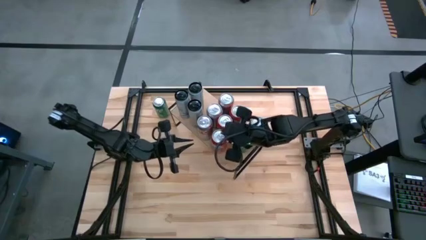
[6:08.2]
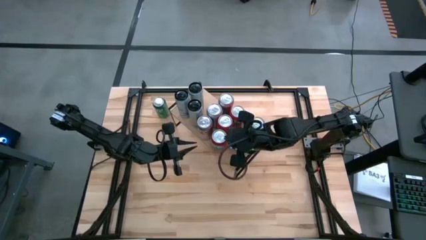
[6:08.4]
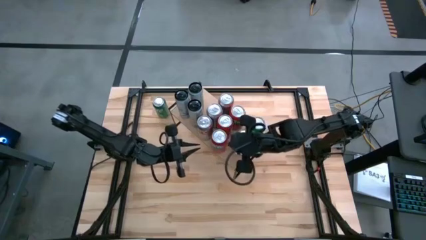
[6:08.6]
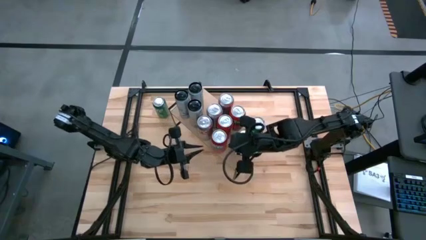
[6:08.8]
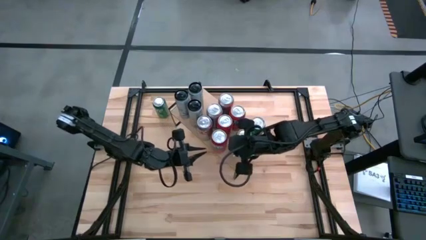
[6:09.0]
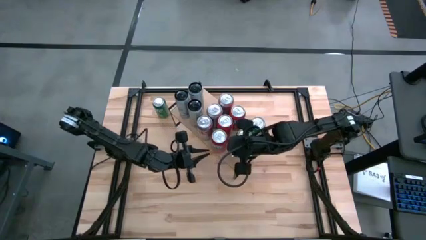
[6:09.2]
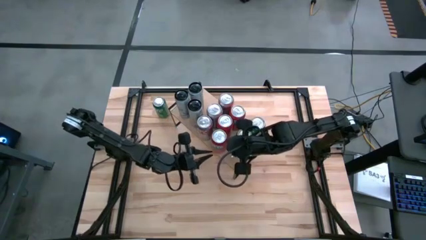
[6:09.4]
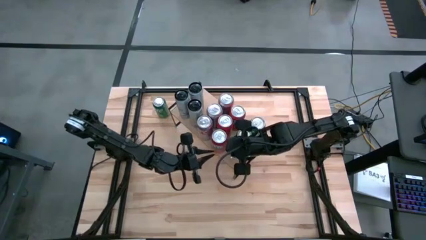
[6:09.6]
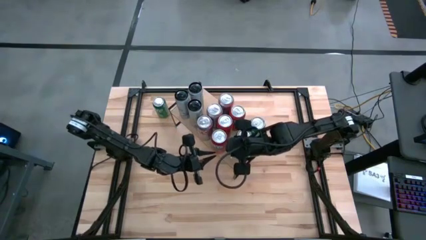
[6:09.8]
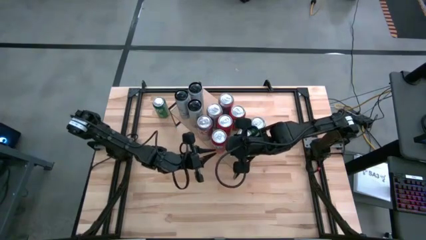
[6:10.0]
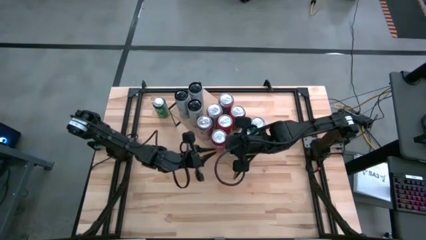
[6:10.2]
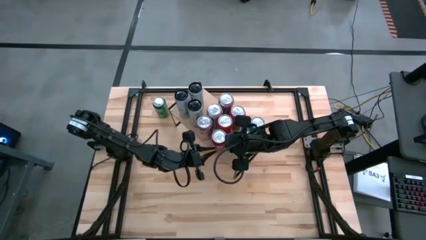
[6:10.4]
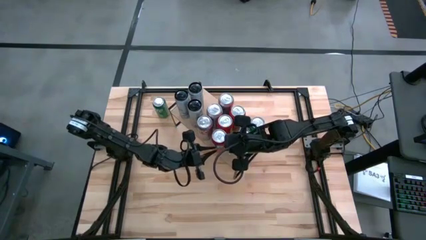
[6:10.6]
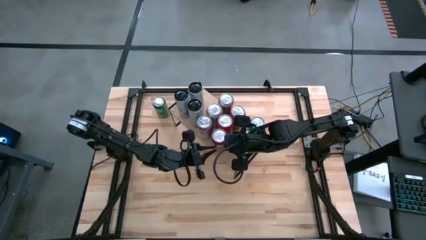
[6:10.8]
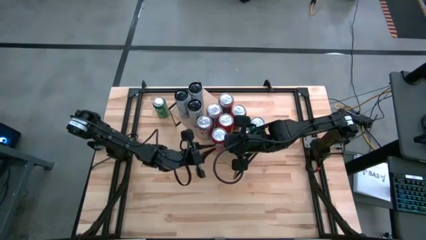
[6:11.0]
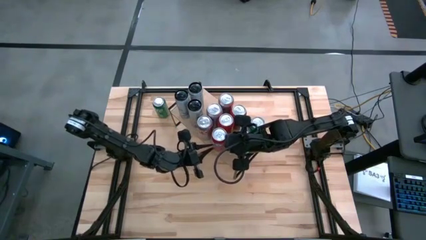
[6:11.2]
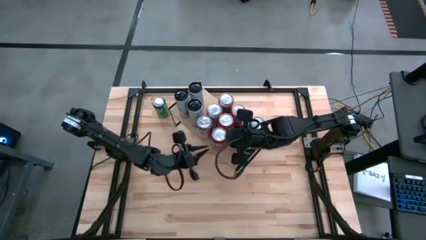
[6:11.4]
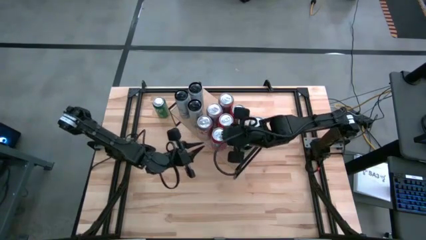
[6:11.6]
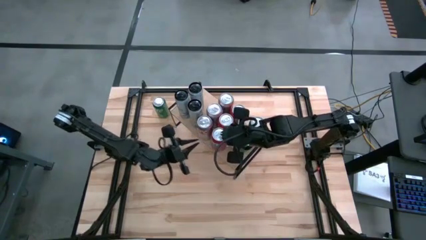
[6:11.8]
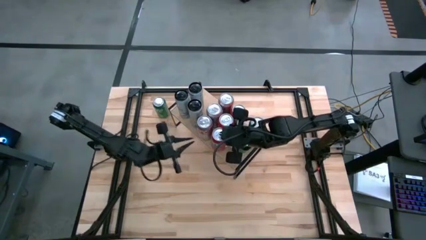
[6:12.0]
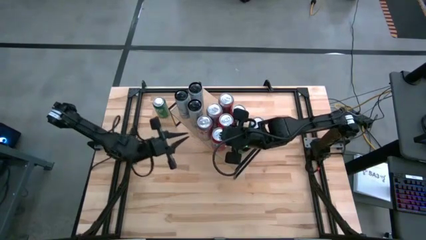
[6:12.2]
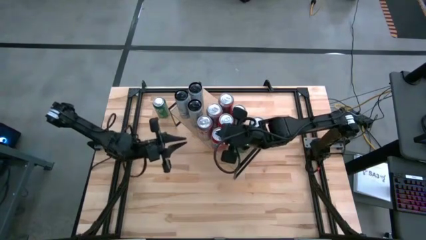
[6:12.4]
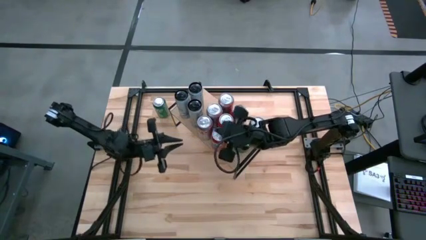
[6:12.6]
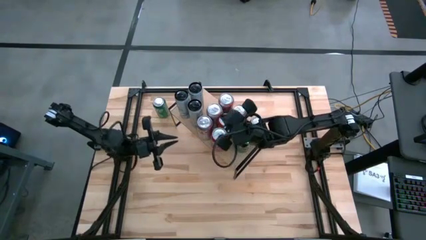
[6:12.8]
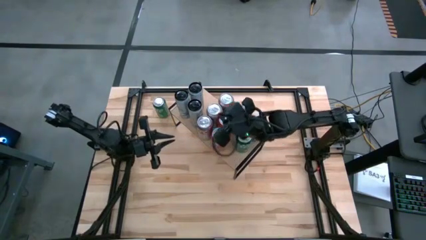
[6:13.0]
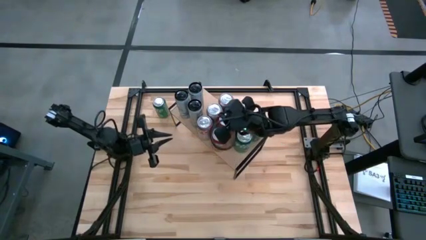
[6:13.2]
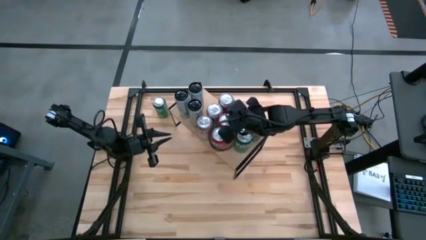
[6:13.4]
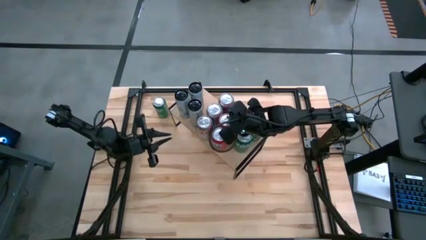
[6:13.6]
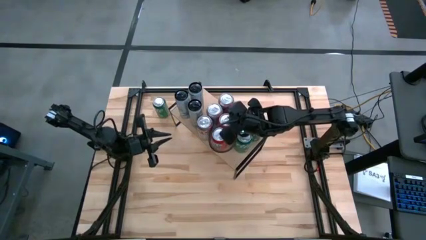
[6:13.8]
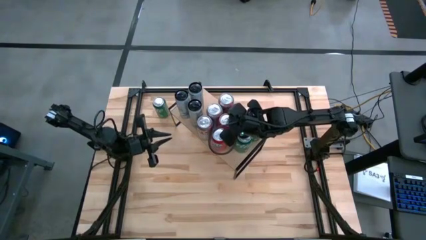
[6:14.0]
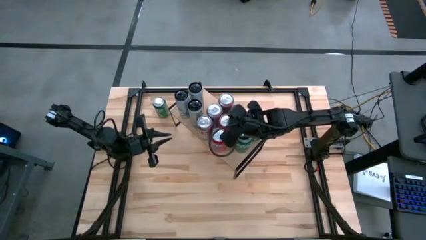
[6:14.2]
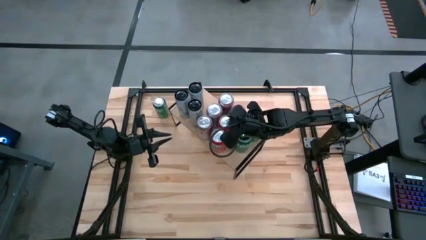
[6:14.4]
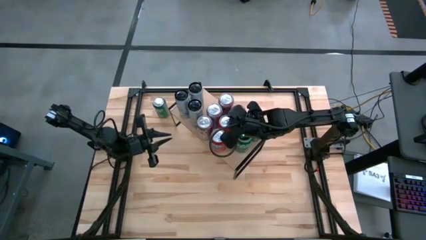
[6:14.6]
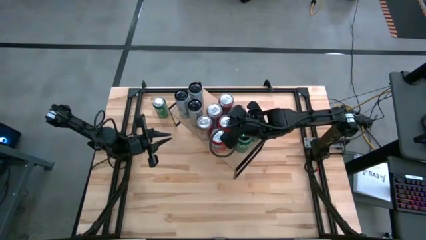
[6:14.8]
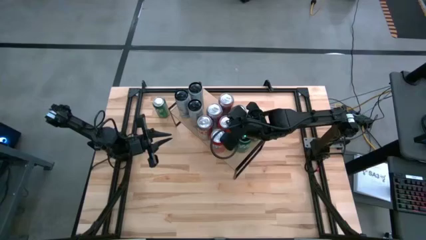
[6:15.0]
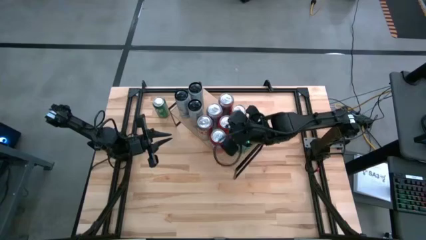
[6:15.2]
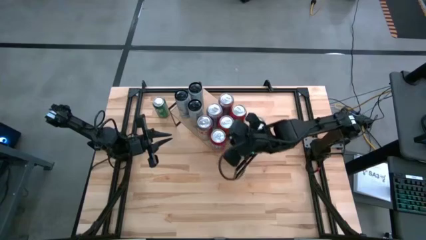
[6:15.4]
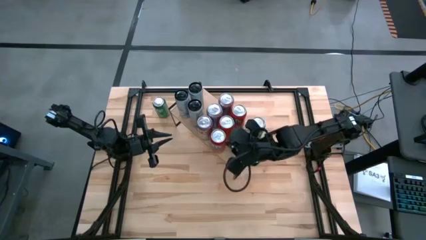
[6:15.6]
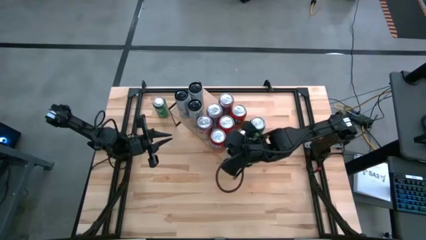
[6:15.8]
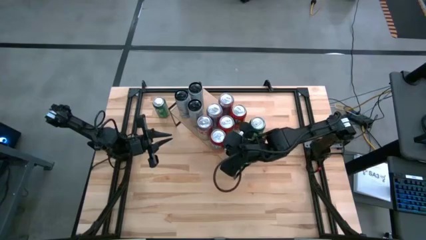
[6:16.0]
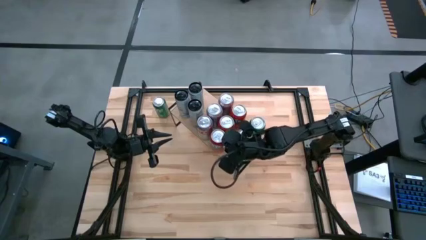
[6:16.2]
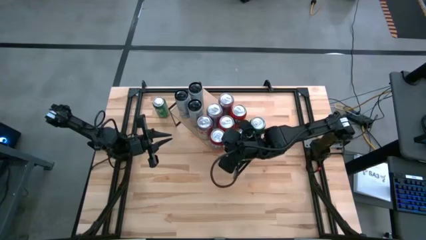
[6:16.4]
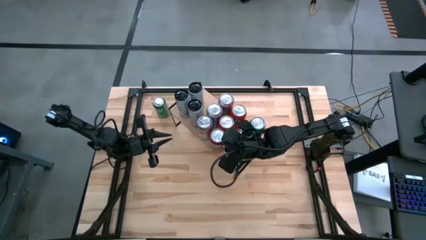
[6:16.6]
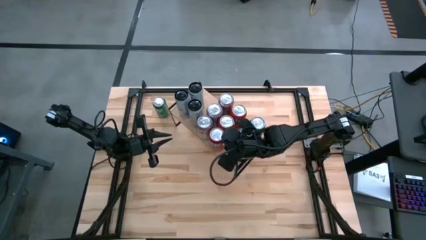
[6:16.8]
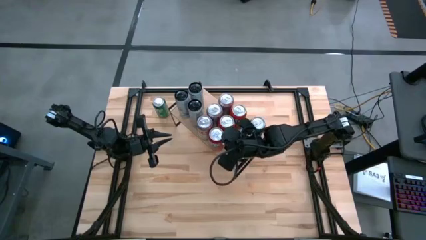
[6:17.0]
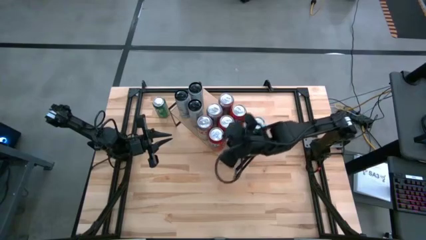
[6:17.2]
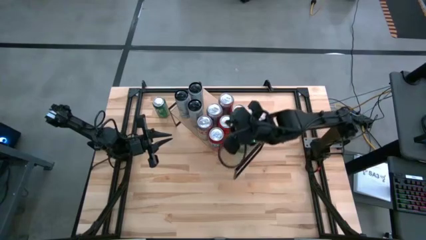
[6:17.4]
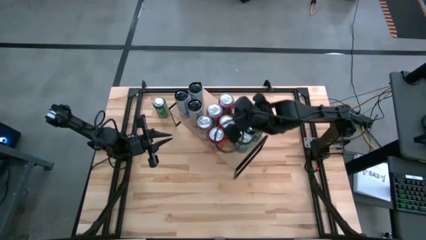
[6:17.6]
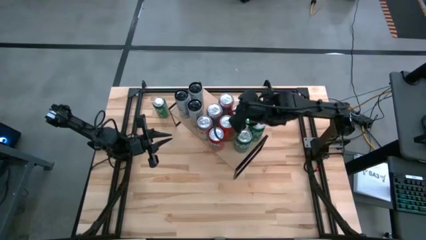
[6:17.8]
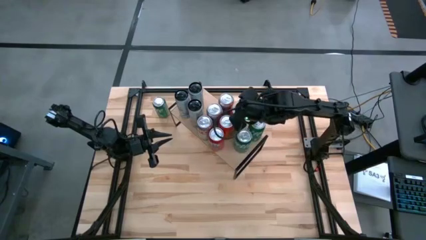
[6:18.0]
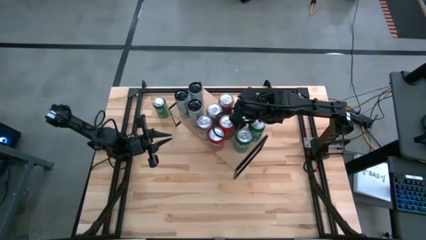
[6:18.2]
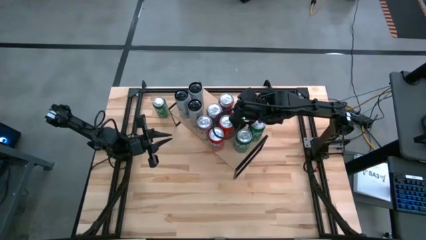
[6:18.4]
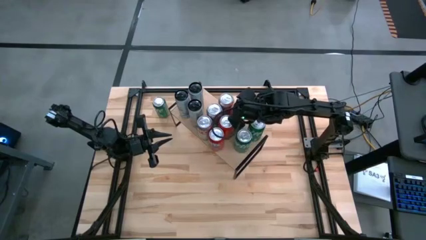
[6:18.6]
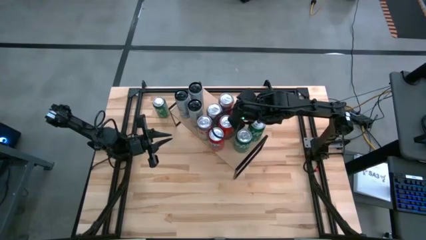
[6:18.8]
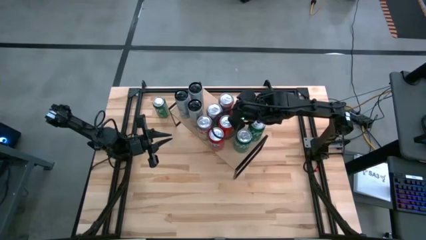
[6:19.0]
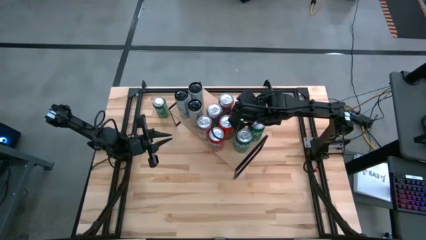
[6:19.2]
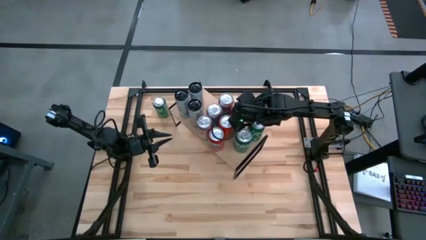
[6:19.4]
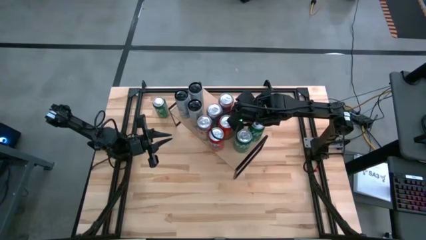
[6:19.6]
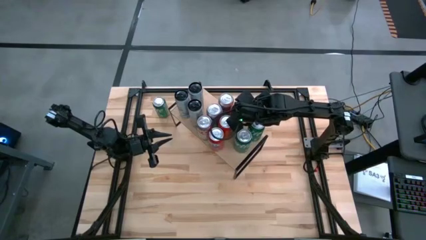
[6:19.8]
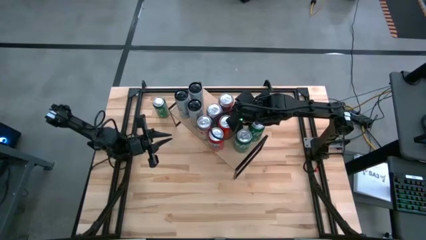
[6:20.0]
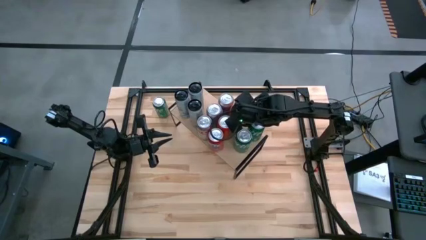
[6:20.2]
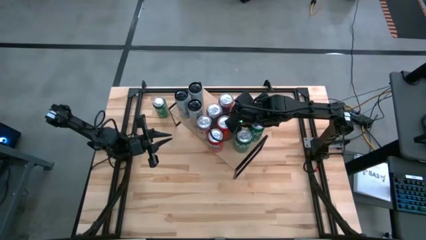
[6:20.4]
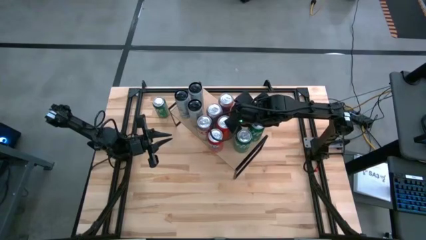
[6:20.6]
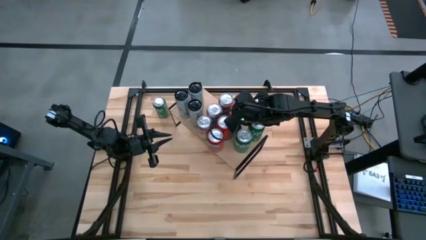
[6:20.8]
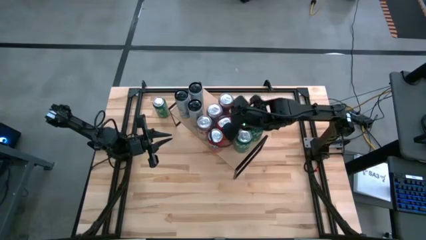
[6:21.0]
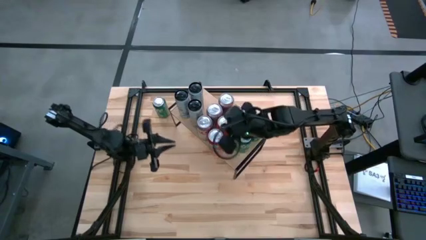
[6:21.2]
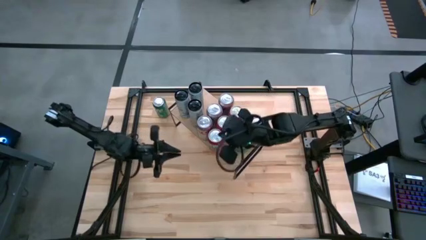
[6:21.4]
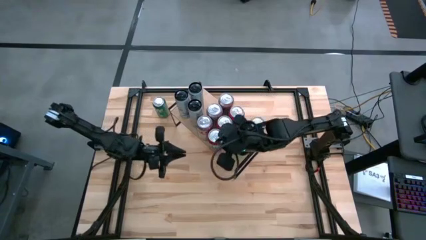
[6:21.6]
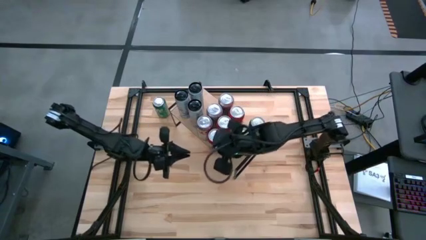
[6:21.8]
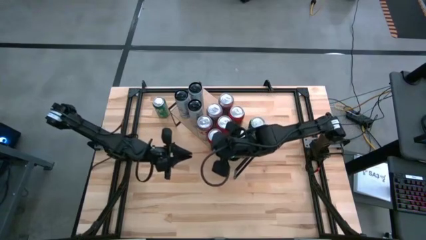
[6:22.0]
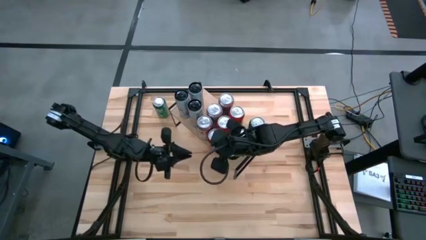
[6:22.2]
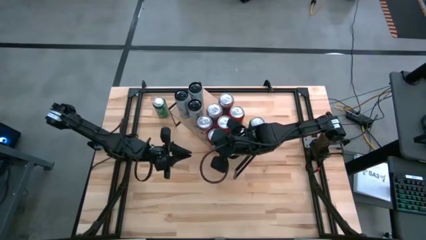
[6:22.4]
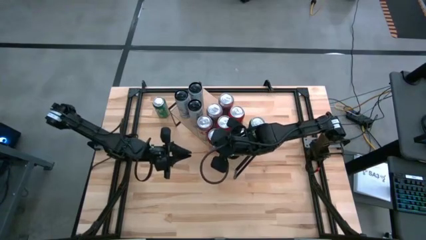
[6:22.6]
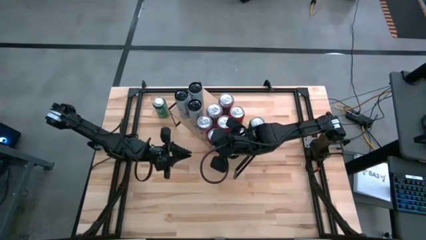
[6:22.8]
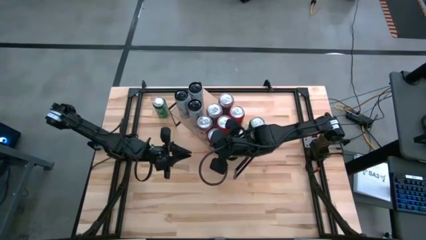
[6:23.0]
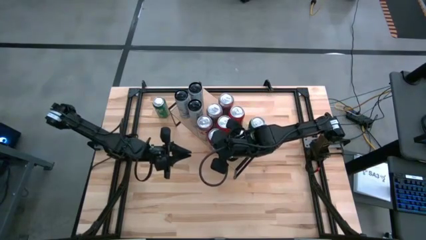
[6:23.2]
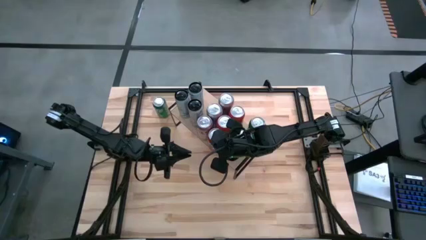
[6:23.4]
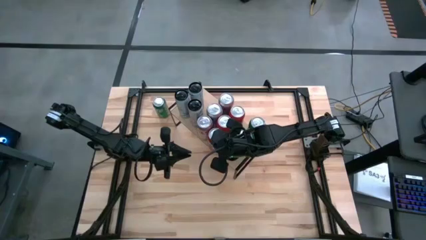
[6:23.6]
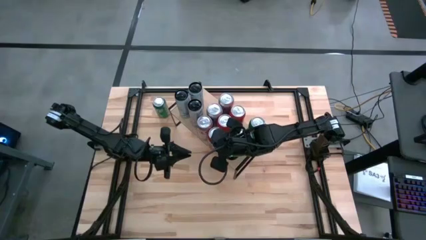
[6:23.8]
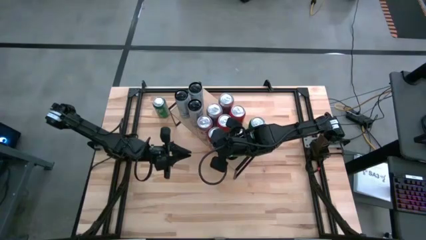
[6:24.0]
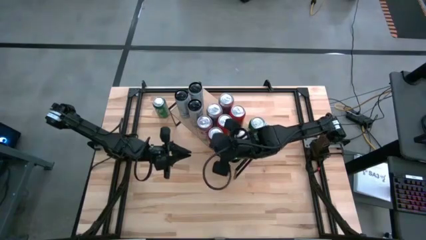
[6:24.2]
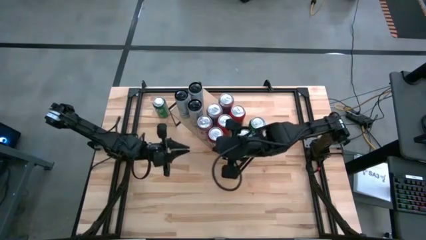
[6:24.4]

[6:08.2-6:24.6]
Task: Place canned beverage on shelf
Put the orange soda can on the shelf aligned with the other orange soda can

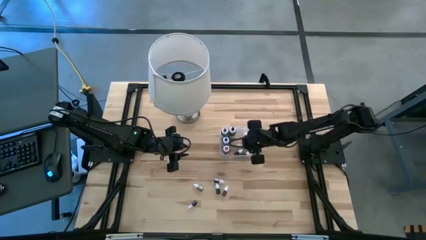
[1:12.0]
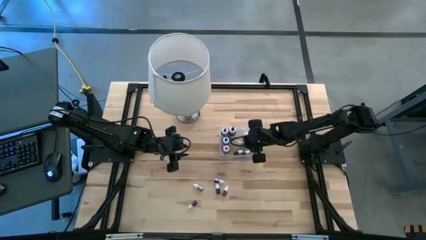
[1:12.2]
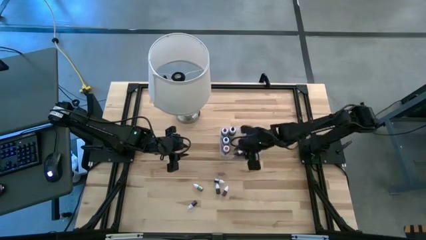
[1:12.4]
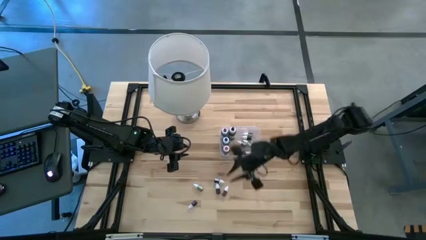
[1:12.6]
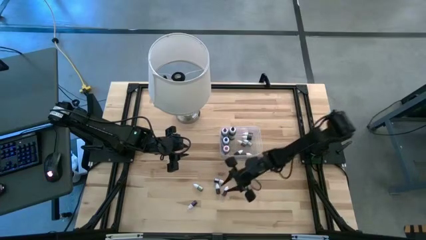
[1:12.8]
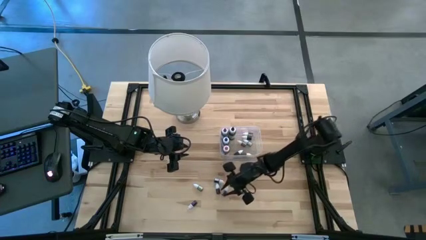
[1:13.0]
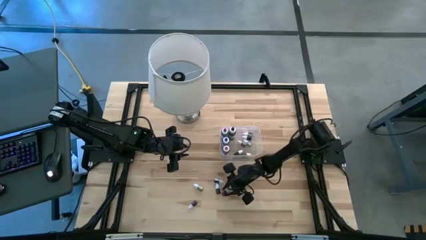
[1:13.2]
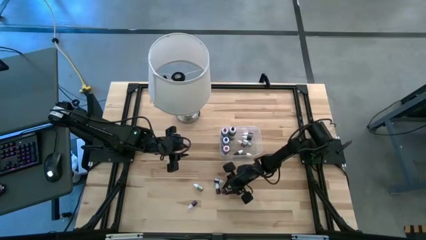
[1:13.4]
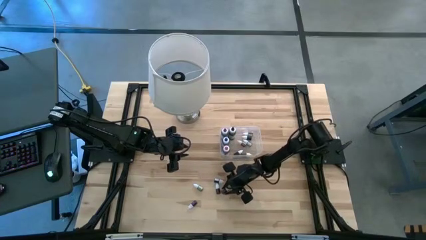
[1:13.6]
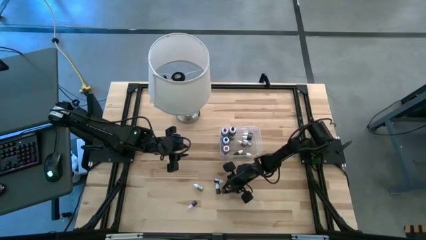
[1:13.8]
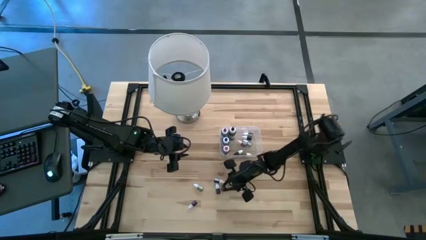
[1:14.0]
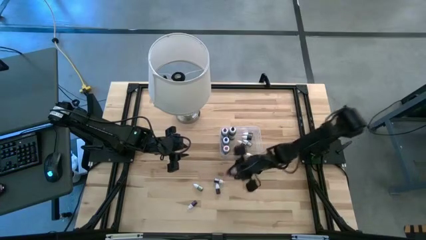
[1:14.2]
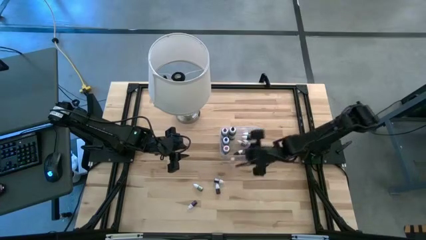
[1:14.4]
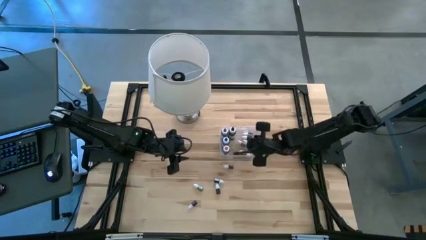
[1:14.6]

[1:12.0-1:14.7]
Task: Pick & Place food coloring
Put the small orange food coloring bottle into the transparent bin
